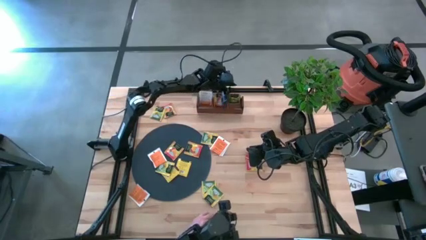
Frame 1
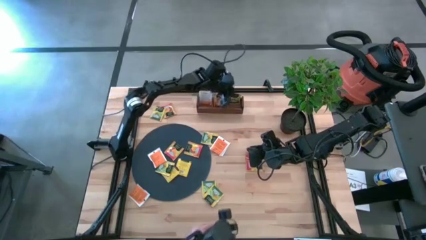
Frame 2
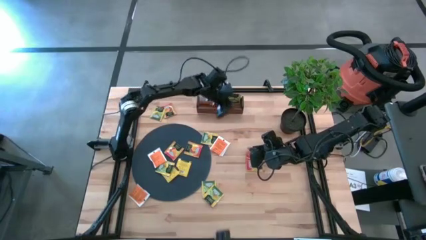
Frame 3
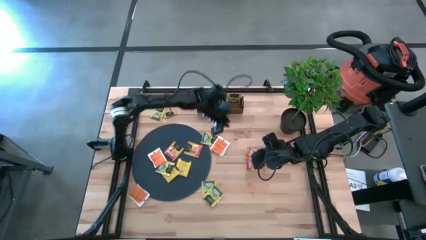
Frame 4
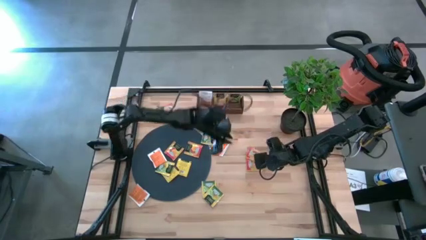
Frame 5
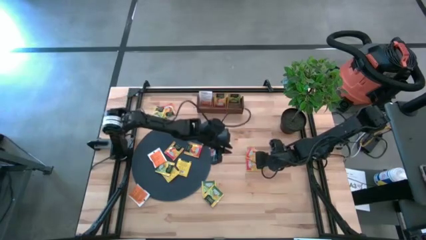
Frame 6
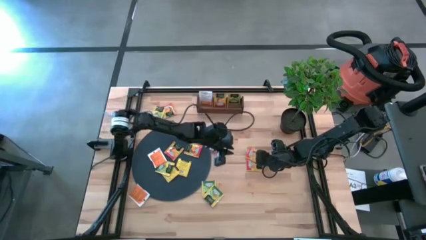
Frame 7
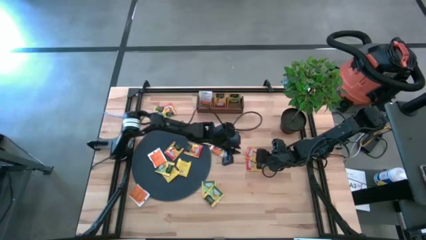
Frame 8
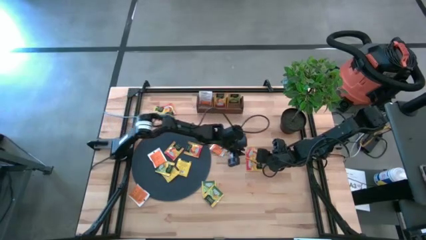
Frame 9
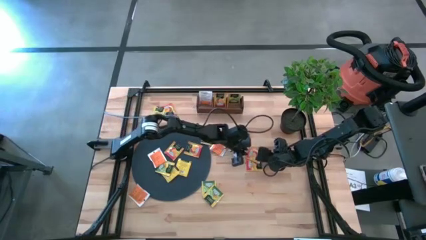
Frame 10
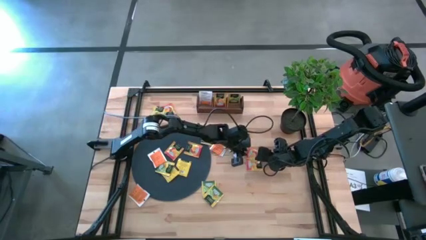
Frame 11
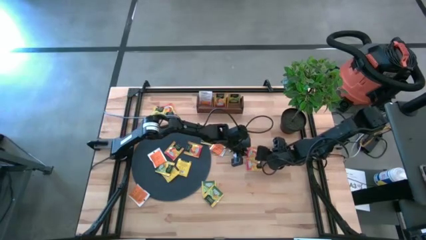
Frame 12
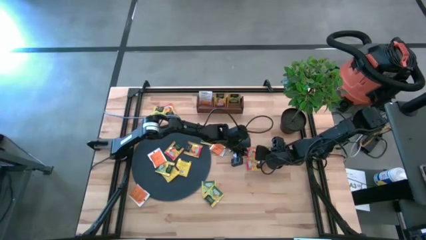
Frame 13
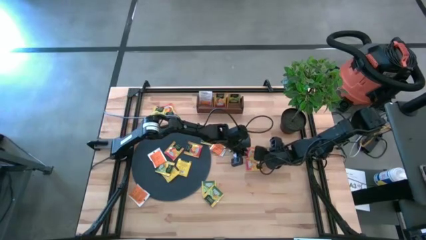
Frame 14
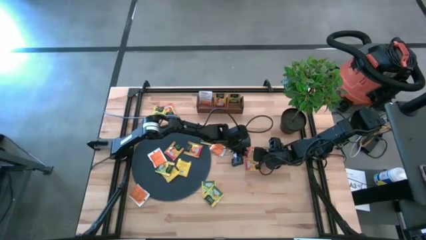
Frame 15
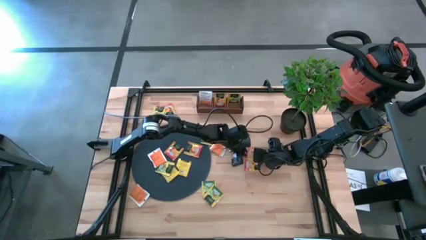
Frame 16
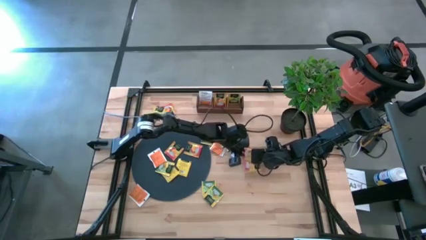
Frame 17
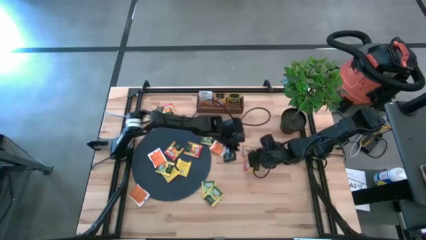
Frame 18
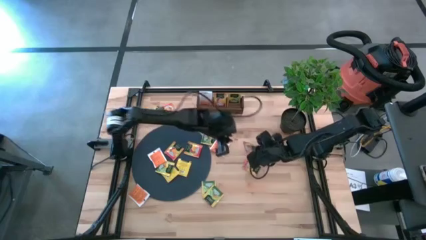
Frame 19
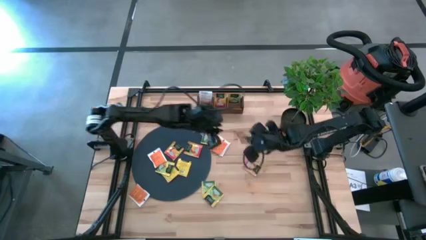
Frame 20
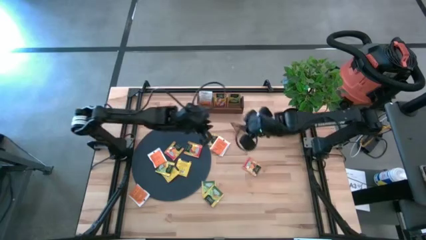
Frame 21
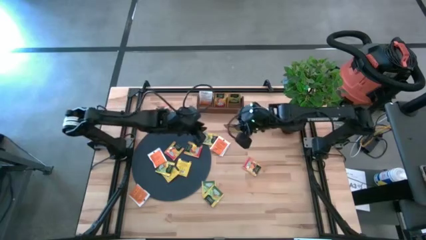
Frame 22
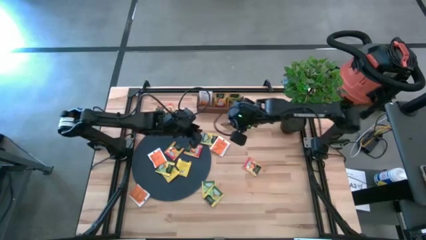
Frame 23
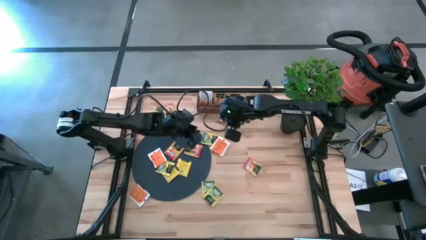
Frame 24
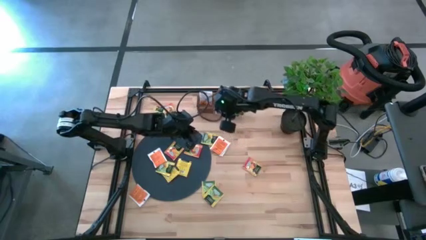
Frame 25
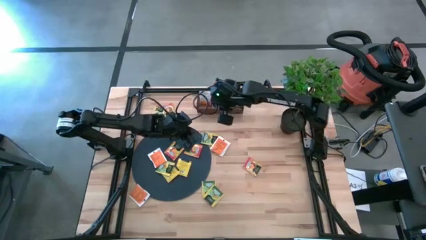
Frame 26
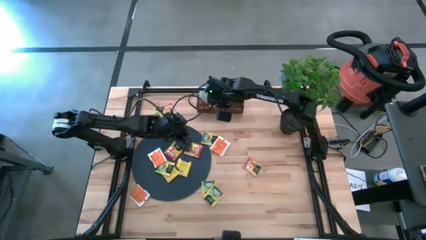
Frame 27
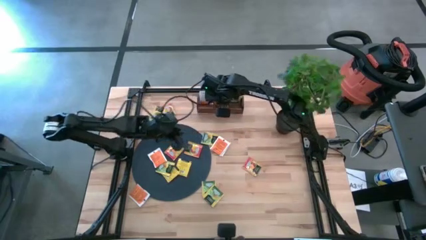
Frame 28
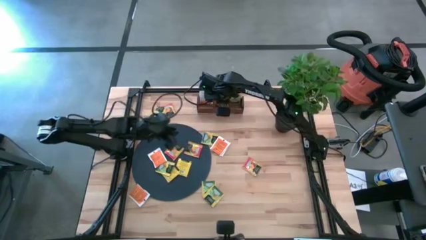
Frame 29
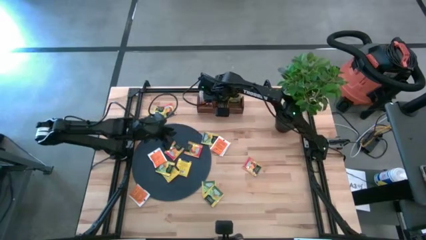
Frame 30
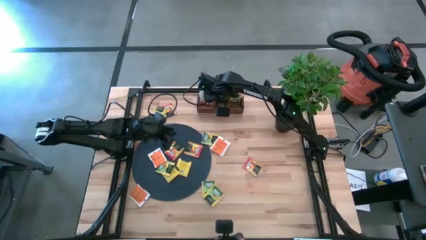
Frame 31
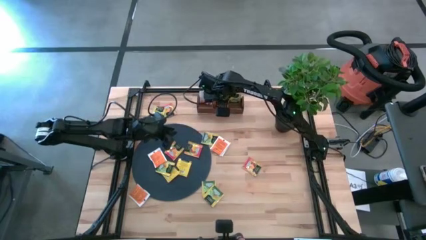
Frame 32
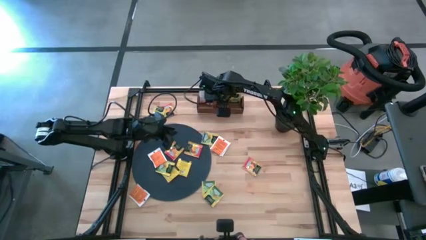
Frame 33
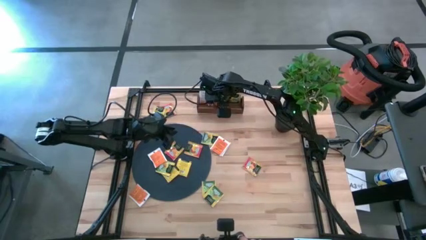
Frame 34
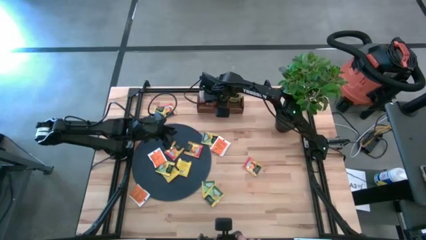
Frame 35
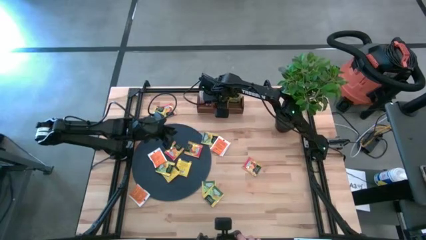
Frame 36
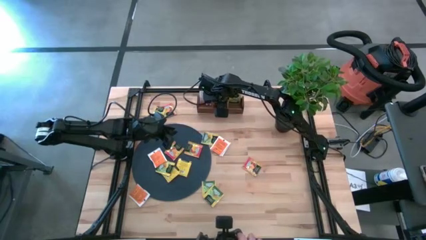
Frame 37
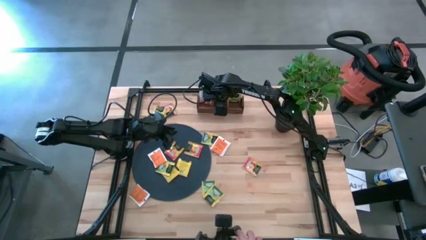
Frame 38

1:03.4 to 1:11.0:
Task: Pick & Place Tea
Put the yellow tea bag into the middle section of the wooden organizer

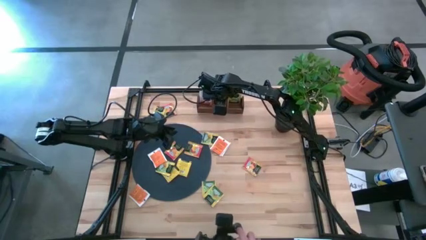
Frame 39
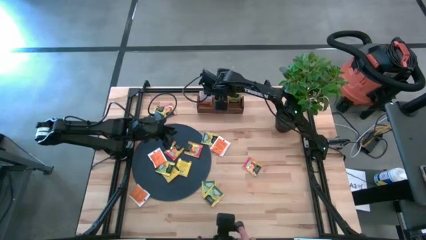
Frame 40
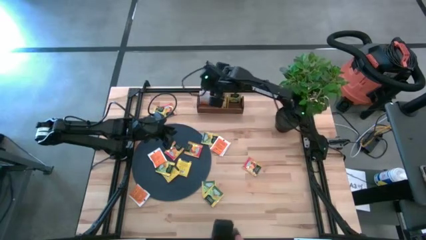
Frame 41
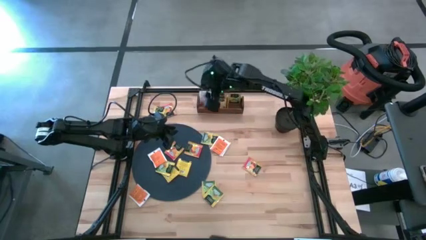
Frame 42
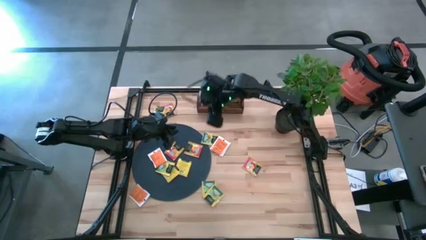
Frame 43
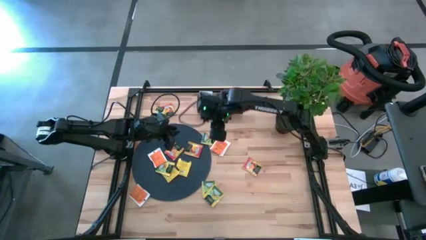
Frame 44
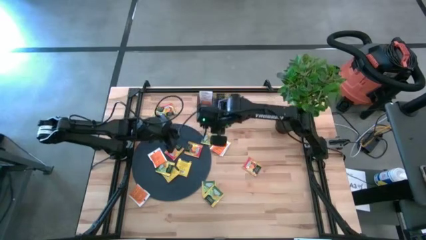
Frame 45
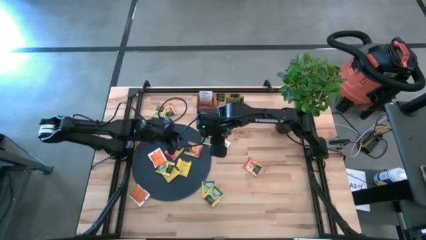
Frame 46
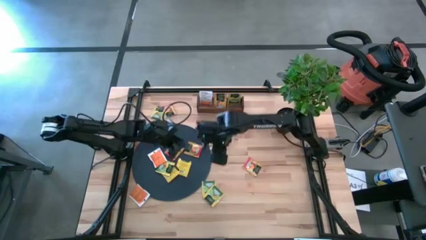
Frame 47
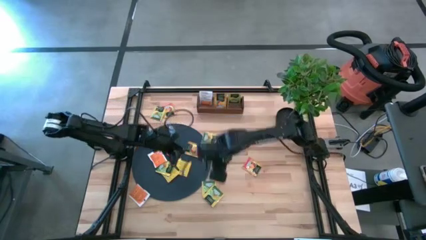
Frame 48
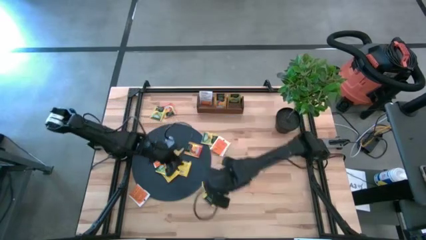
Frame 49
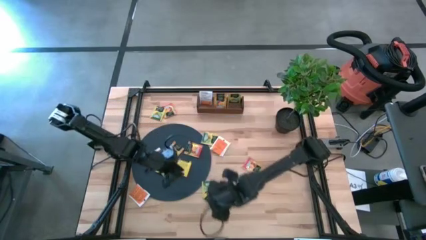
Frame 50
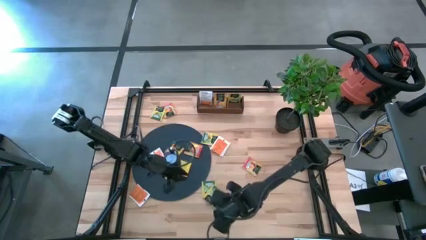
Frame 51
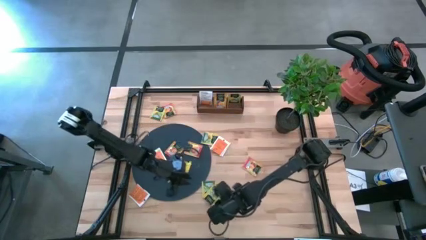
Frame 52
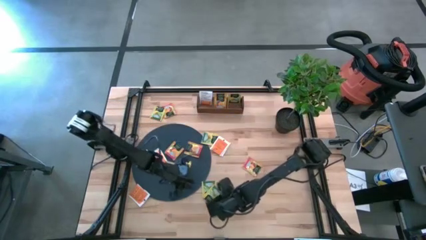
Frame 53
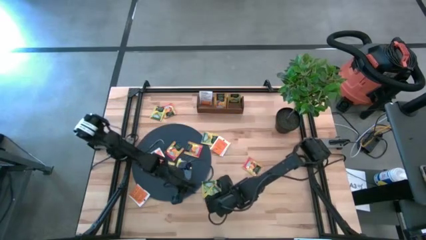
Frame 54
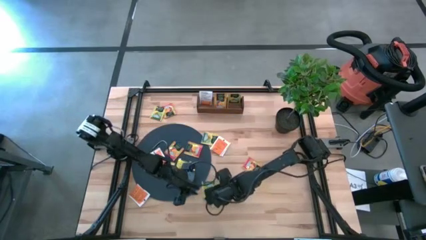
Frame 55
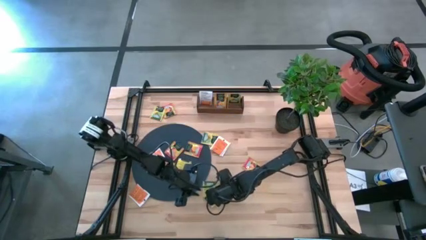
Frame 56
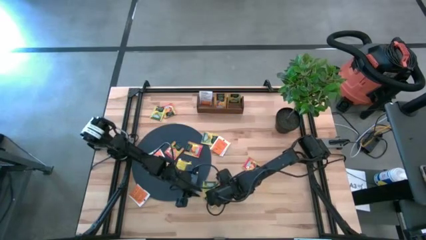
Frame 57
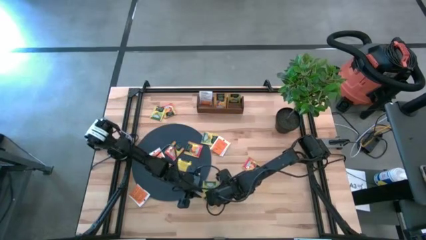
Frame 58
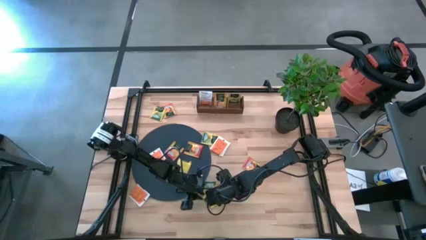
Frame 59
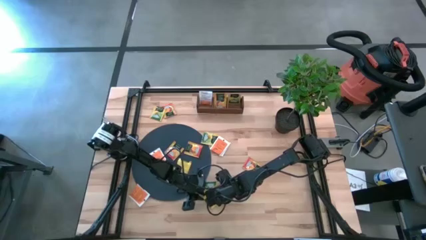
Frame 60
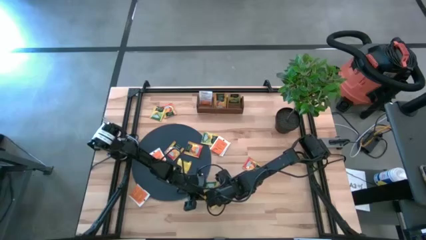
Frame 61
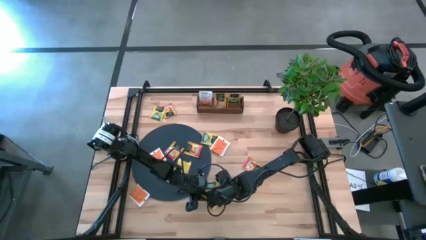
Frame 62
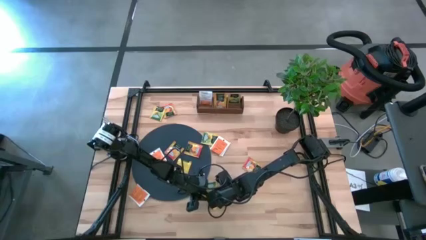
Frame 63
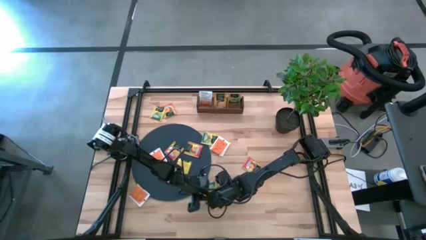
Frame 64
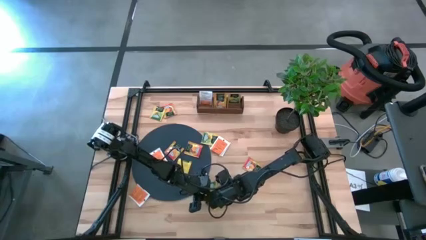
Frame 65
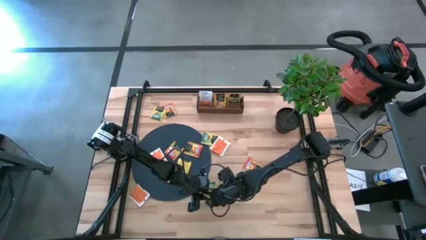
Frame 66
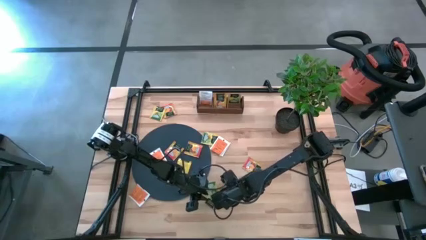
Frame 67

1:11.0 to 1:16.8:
Put the green tea bag into the right section of the wooden organizer

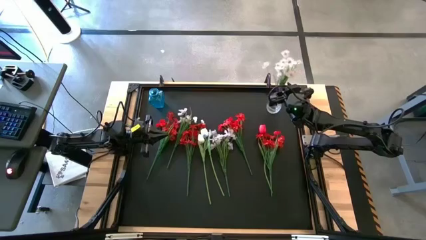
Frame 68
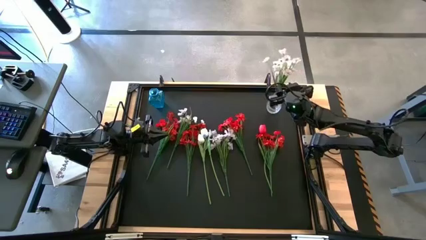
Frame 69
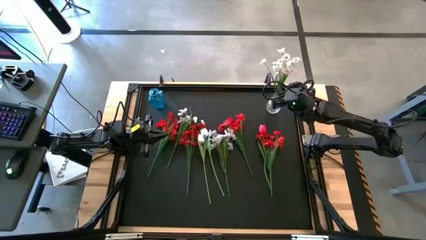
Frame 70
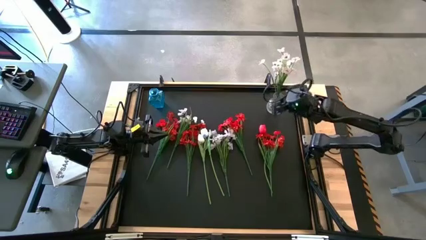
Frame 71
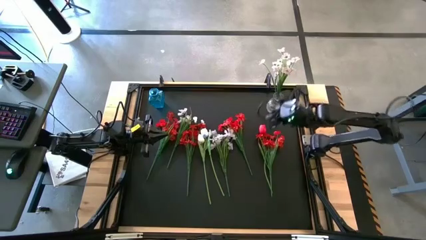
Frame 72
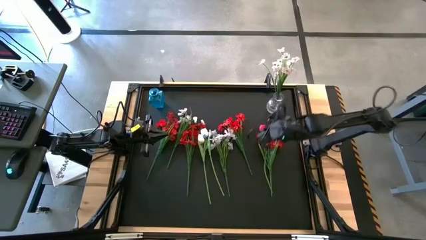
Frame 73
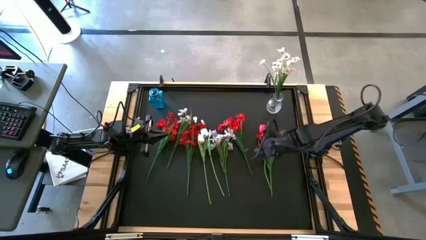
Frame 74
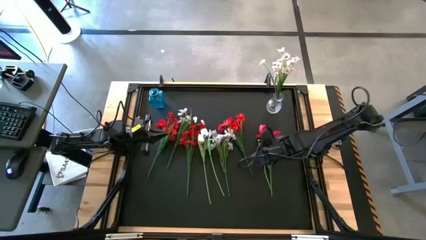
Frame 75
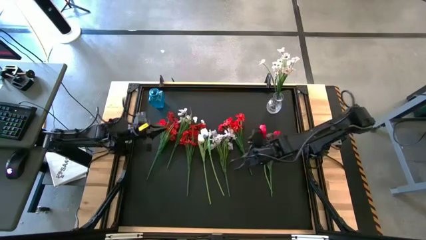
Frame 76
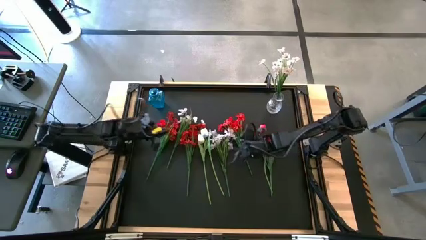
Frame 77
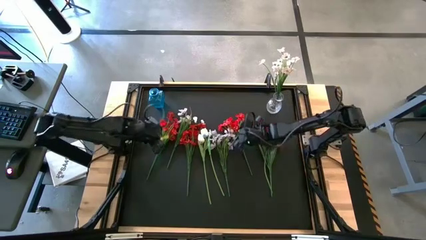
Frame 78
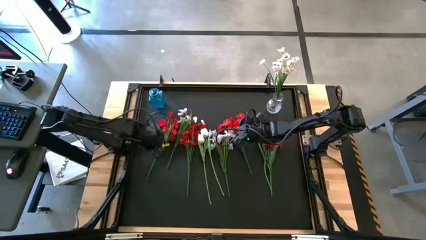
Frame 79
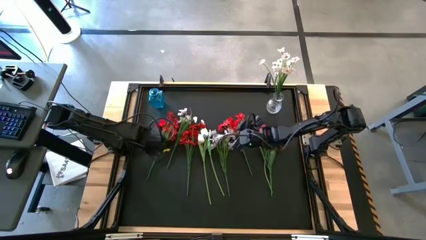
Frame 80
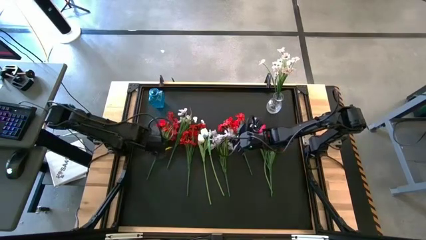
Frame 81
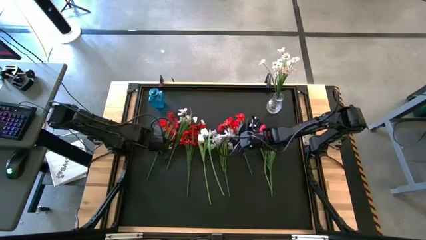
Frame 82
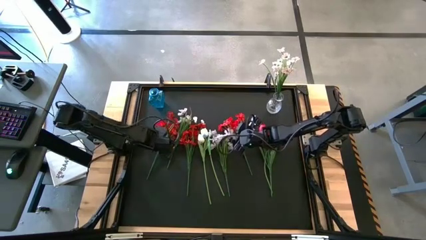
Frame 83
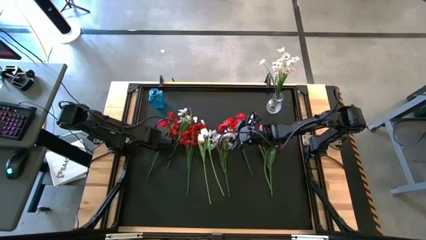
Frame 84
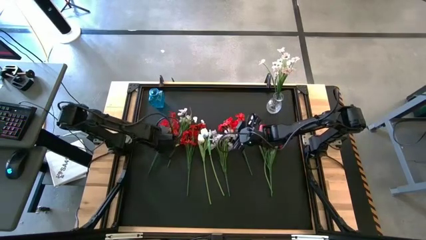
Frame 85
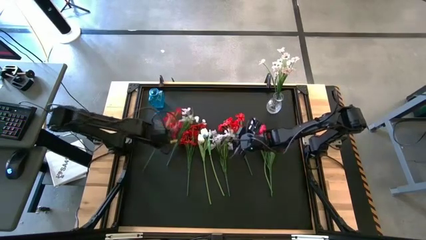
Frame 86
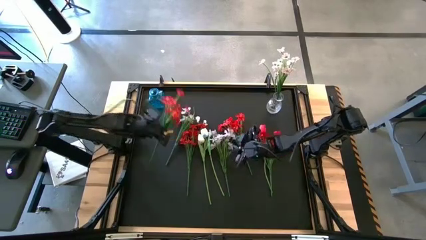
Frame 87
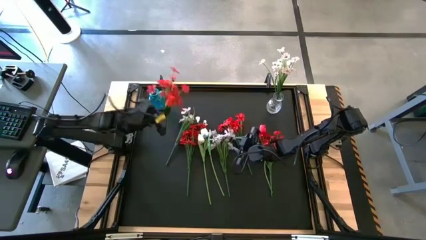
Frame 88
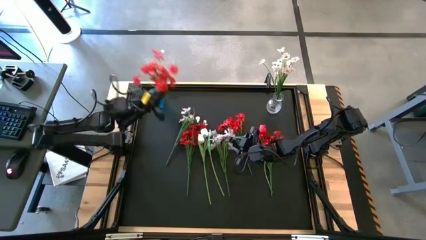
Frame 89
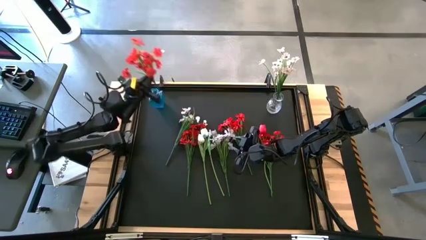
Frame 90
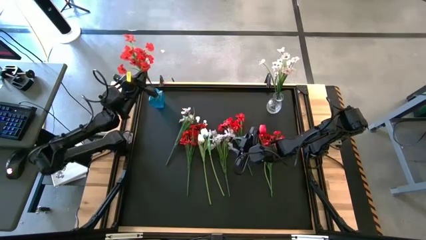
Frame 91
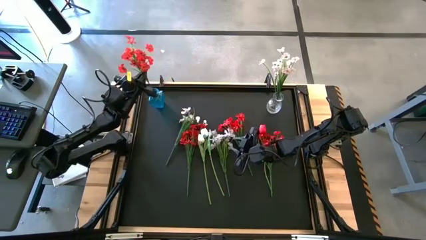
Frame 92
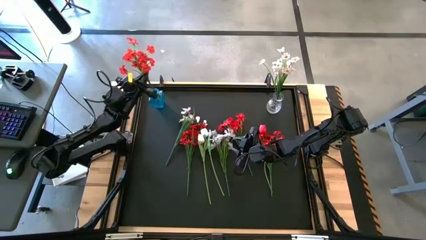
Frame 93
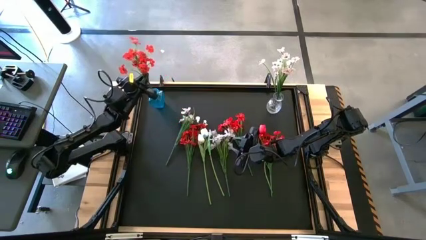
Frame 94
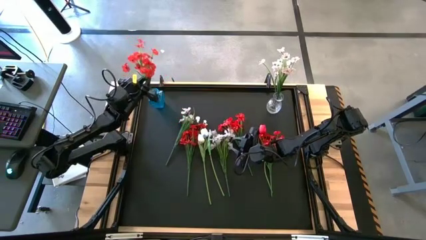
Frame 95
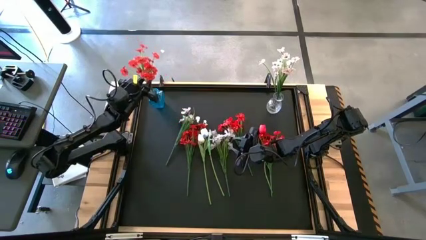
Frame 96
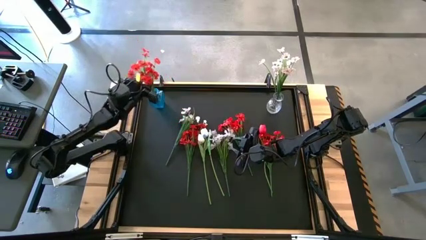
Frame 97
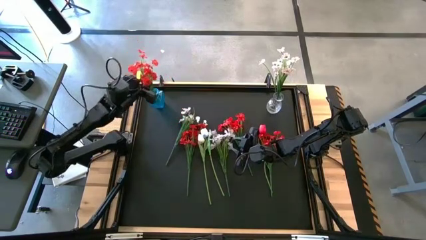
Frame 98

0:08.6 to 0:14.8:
Task: Sort flowers into vase by color
Put the orange orchid into the blue vase
